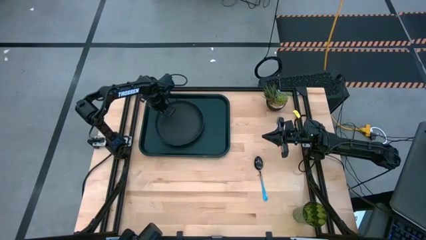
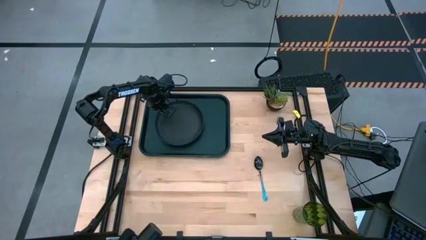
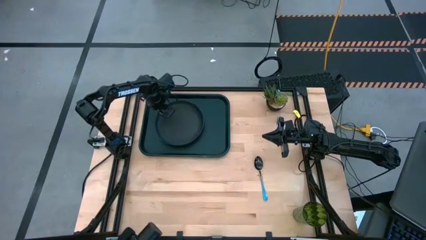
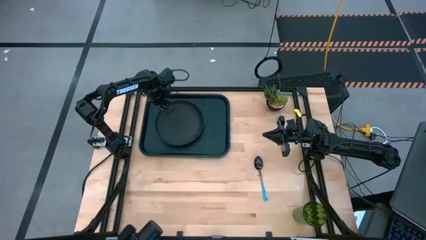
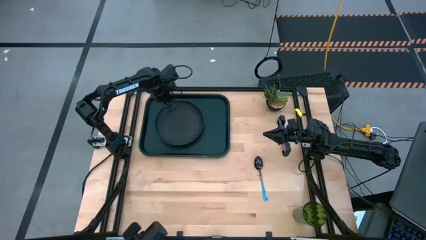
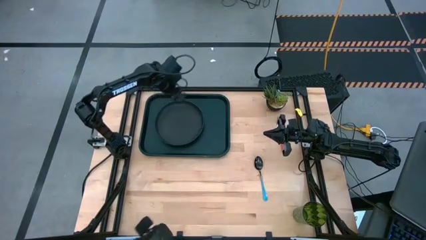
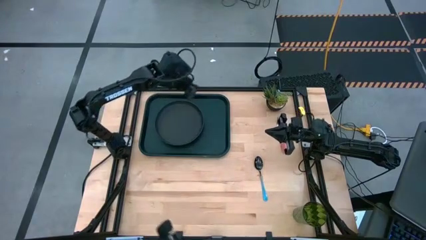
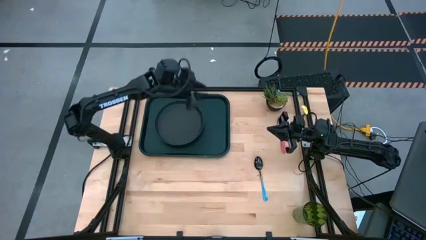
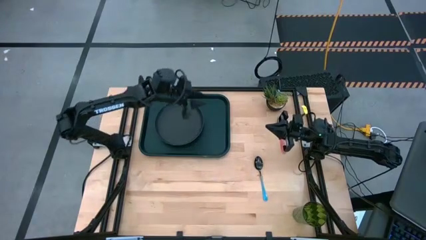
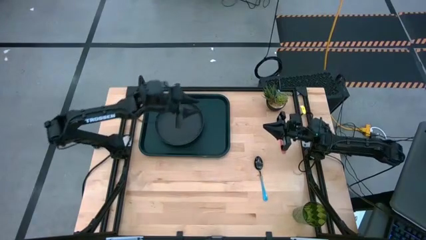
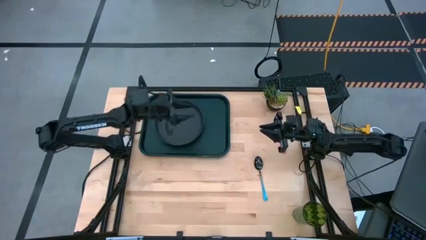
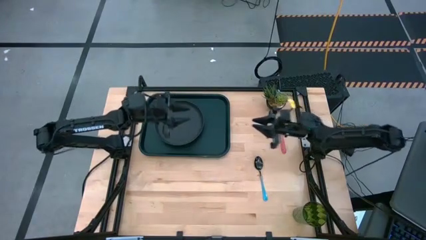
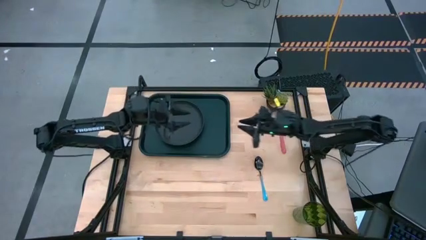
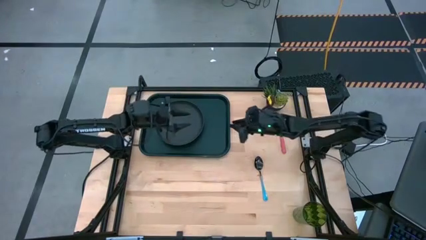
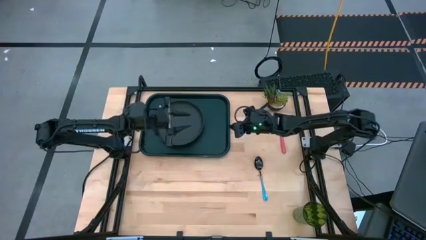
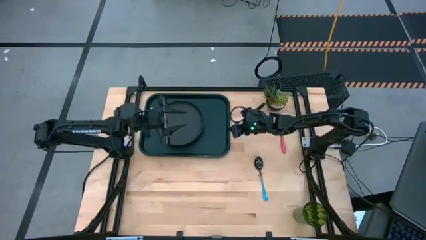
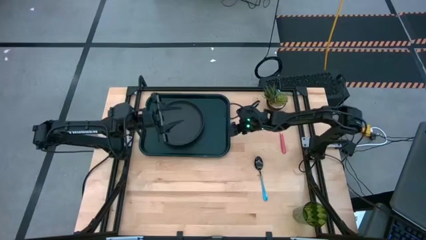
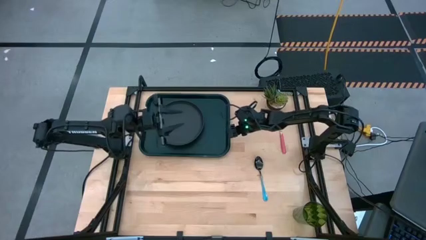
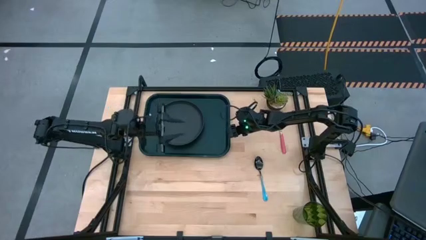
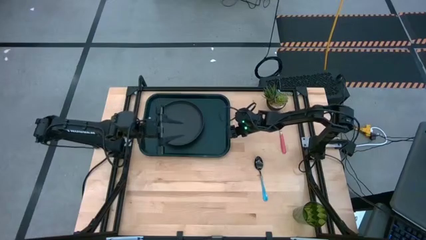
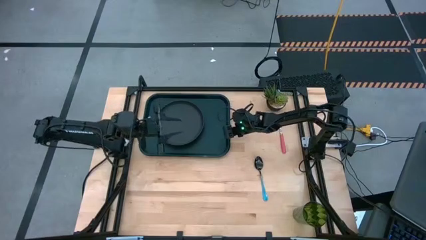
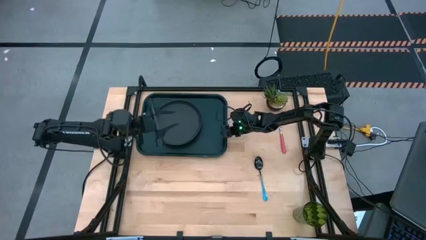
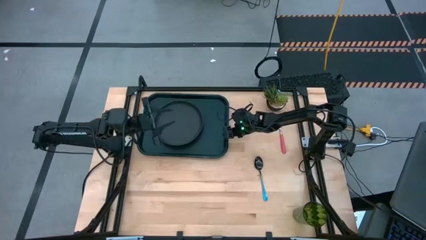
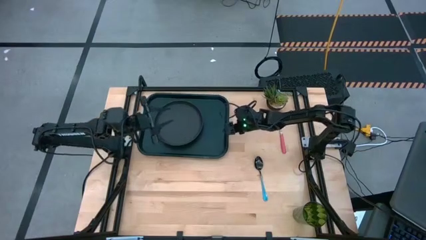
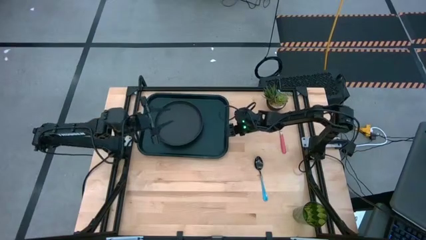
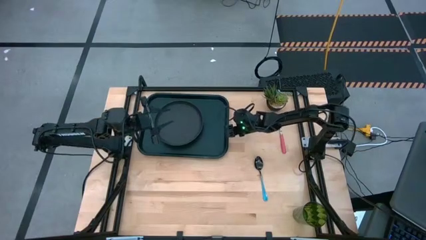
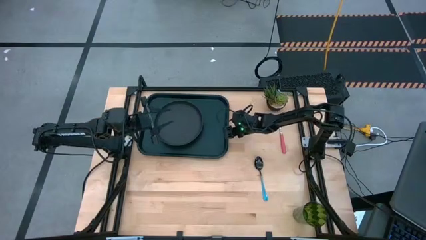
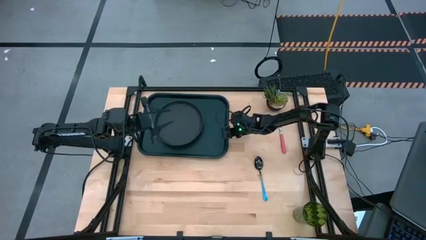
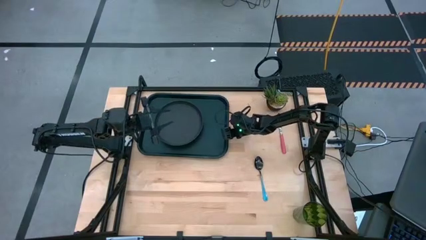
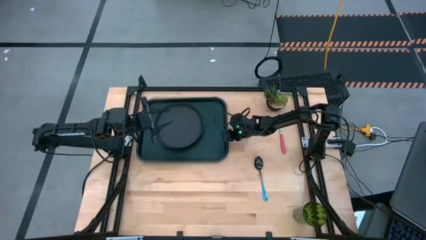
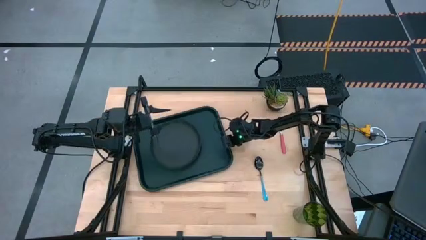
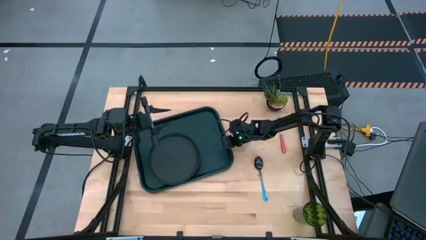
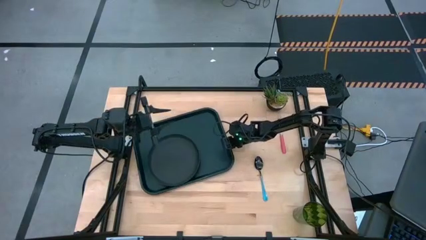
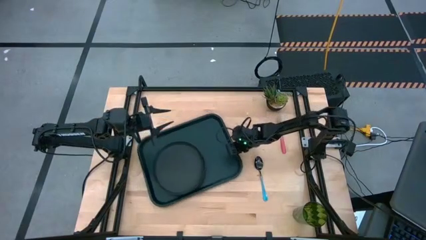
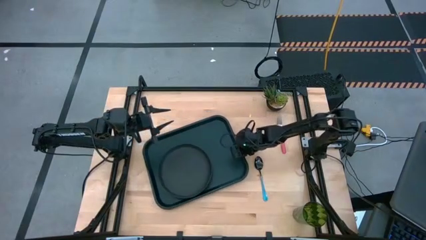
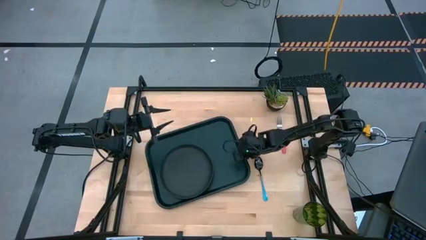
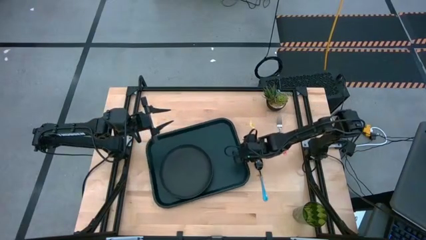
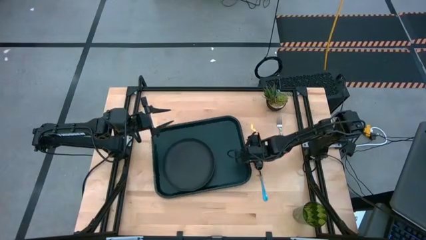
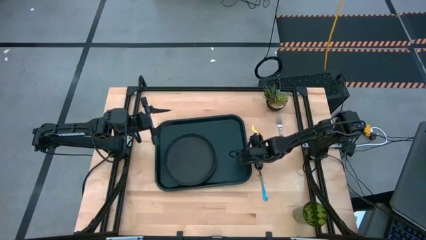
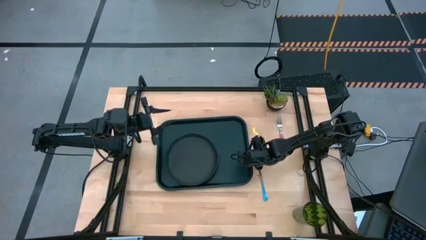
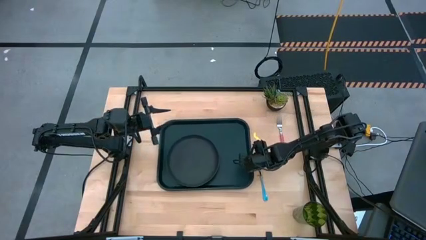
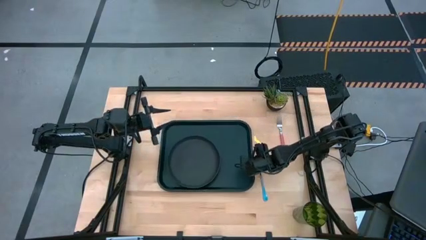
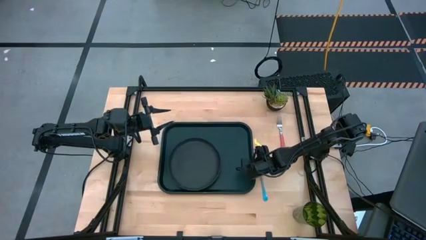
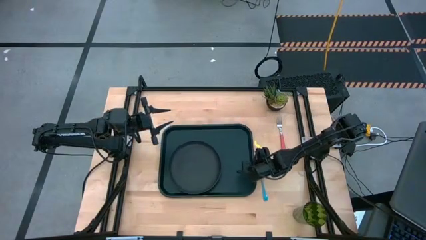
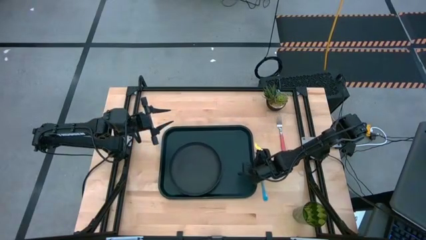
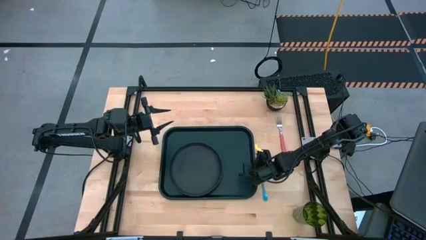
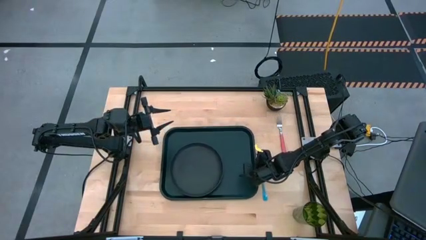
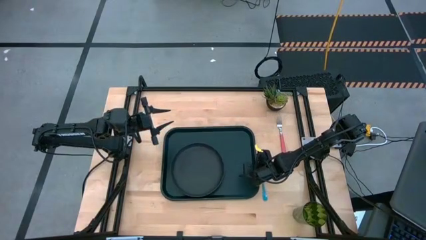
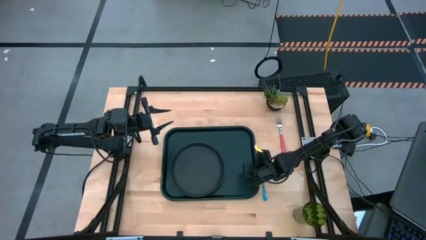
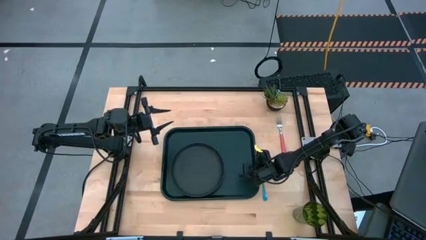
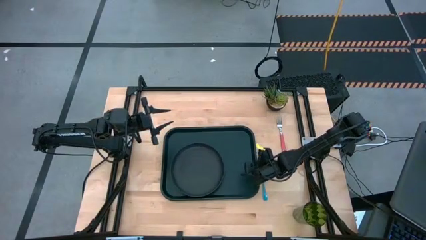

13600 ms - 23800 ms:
Task: Pick and place plate/cup/fork/spoon on tray
Move the black tray to the center of the table

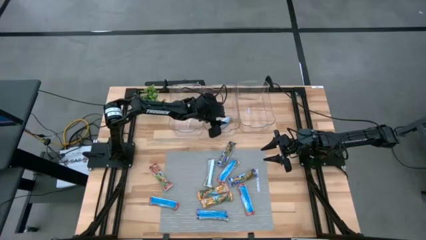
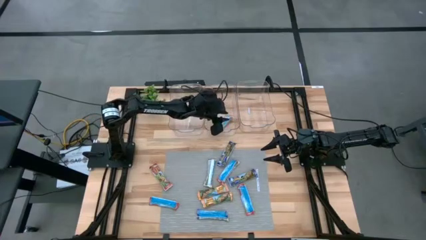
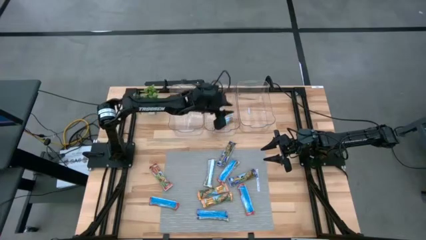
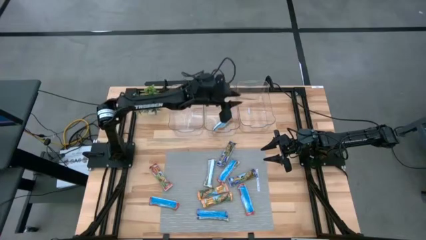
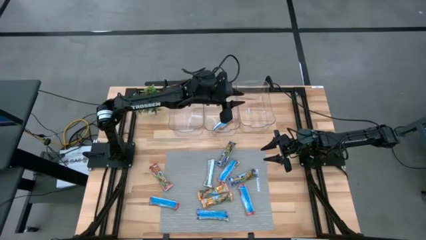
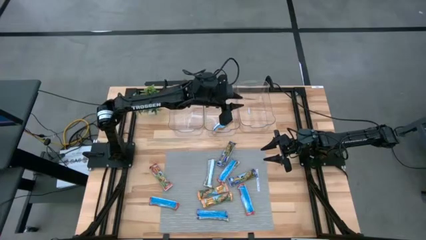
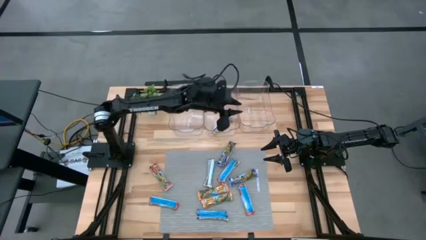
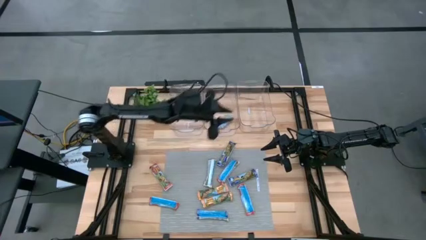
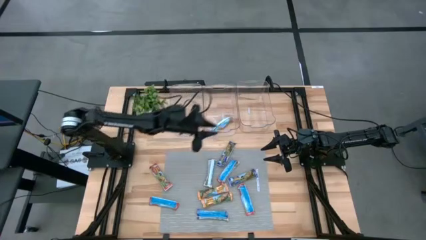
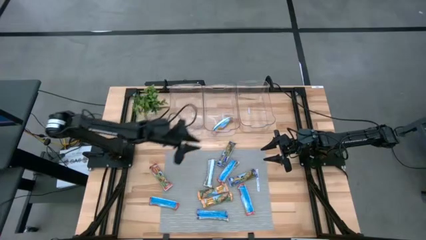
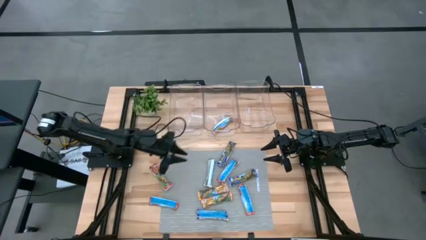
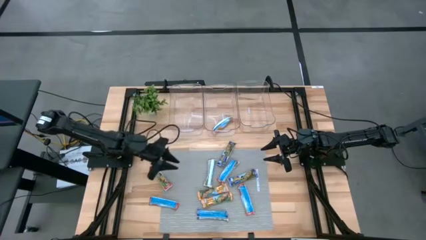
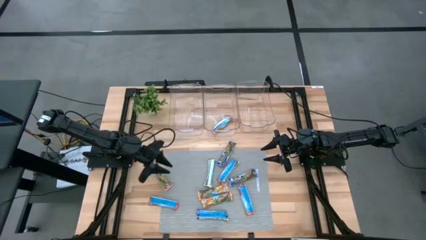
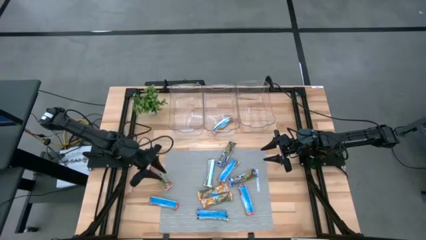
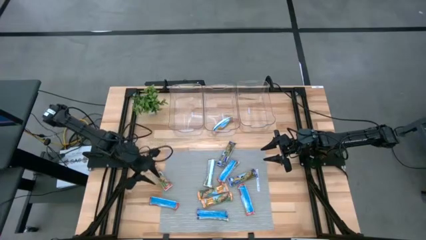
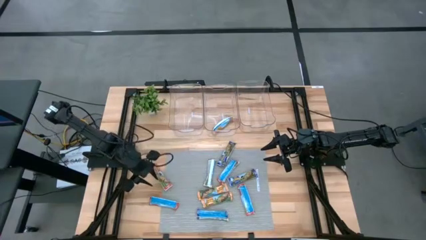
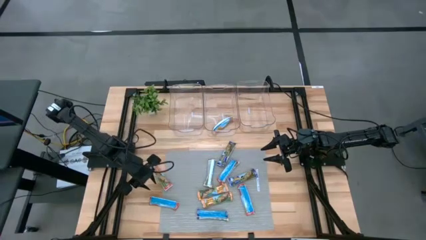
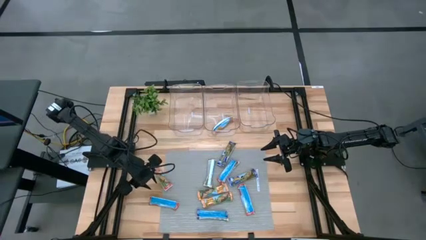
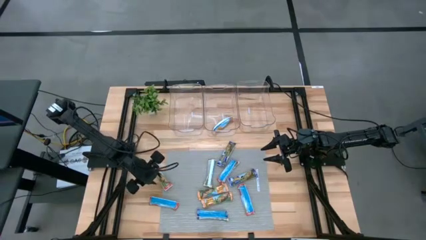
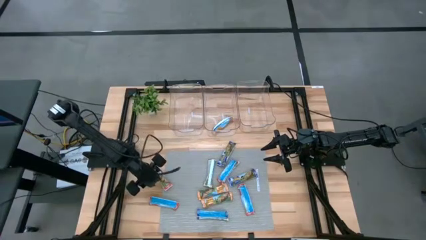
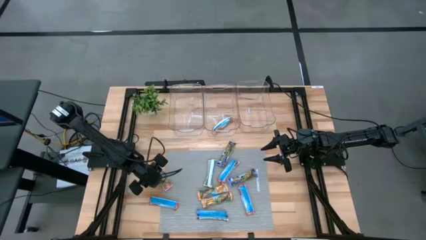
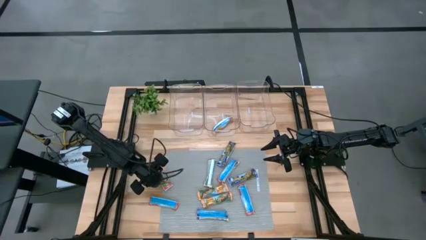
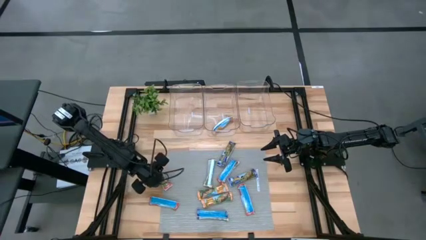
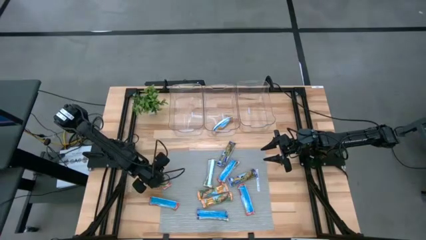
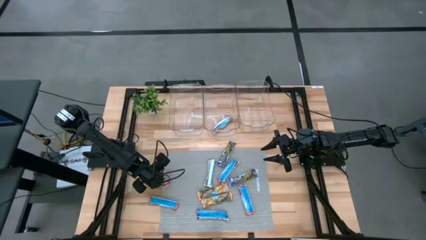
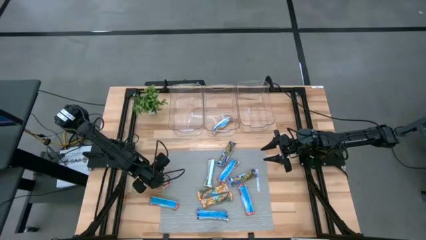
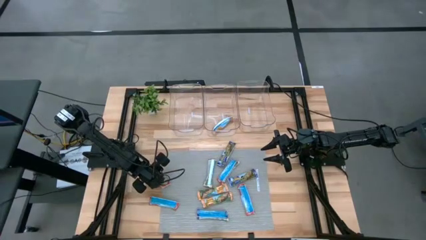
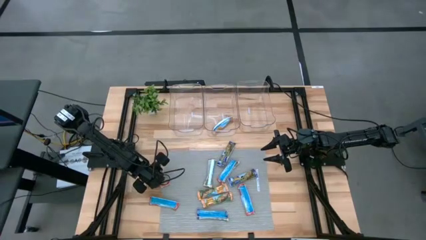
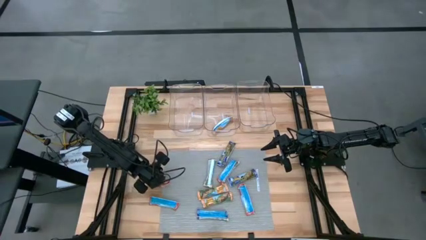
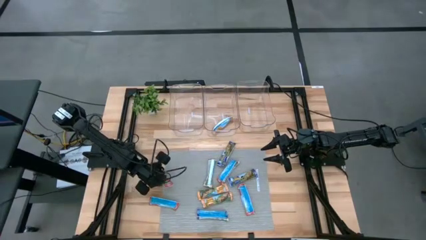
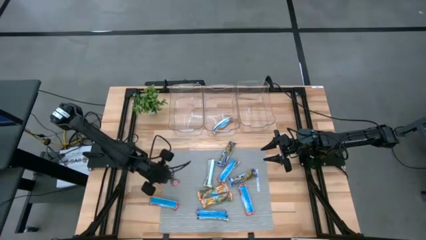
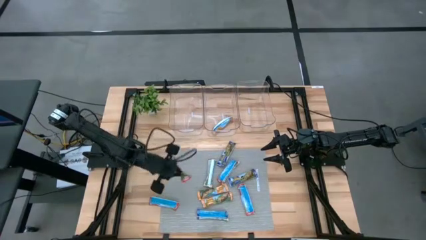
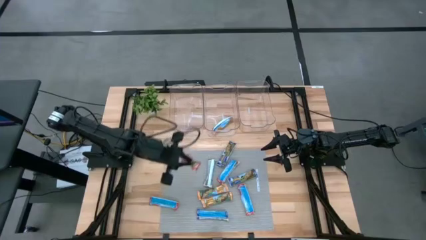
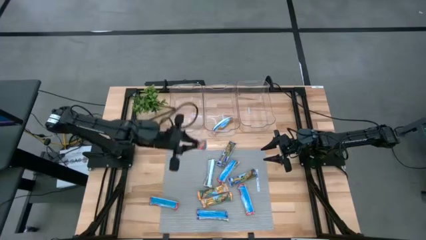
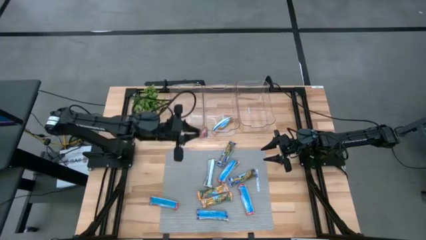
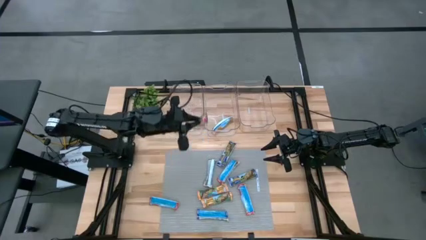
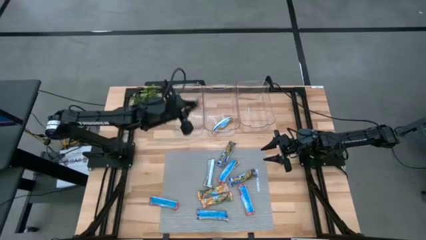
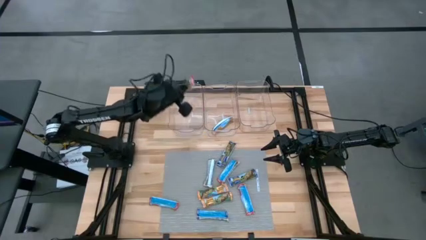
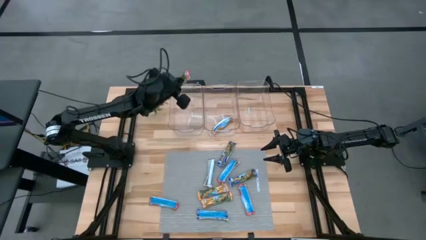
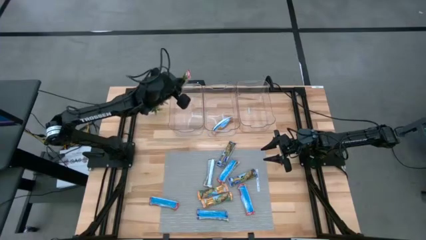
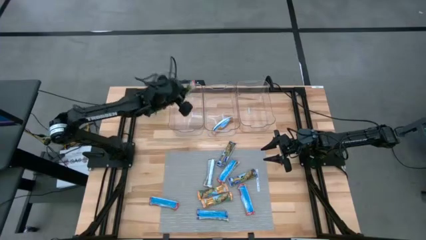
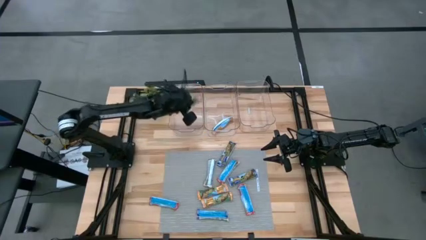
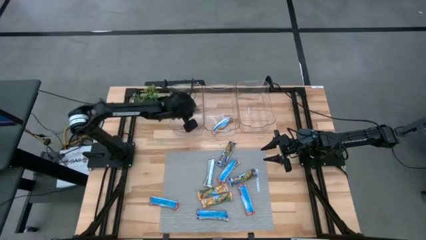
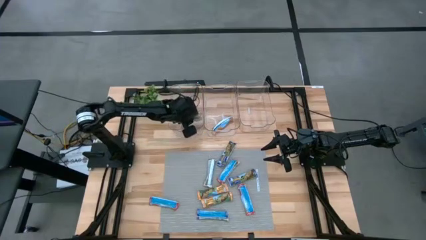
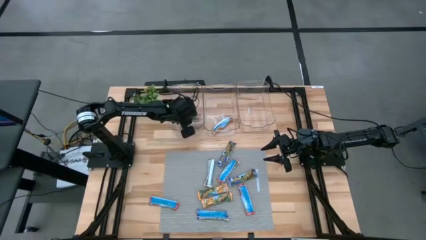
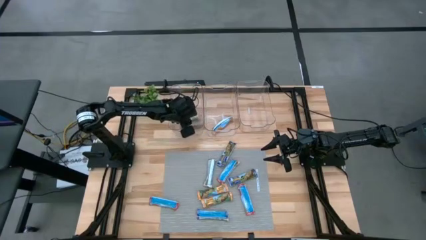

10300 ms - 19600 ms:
Task: Pick and place Granola Bars by type
Put the red granola bar into the left transparent bin
